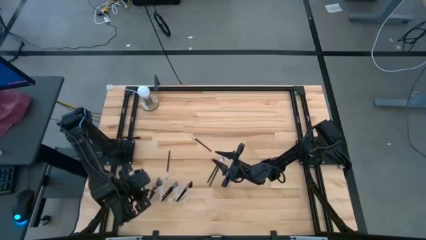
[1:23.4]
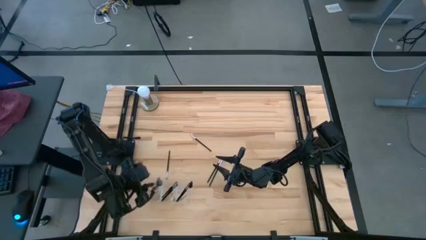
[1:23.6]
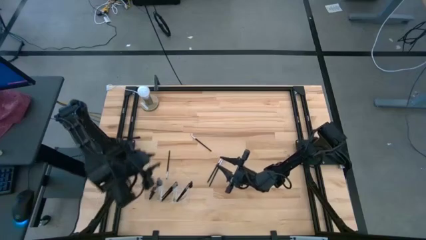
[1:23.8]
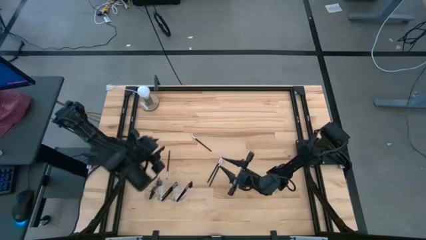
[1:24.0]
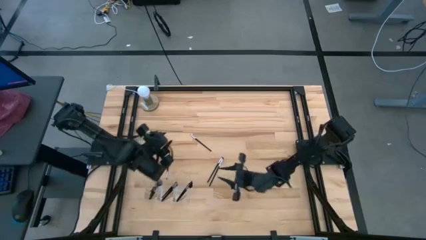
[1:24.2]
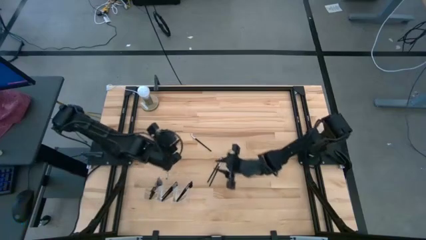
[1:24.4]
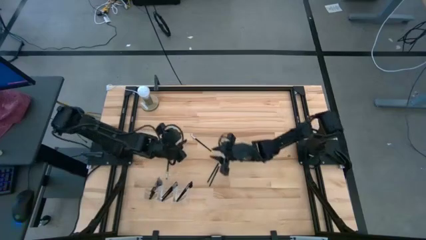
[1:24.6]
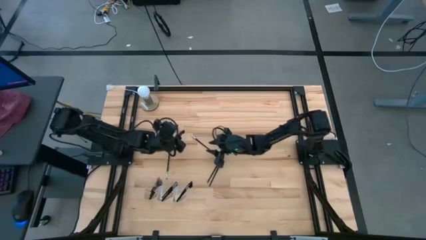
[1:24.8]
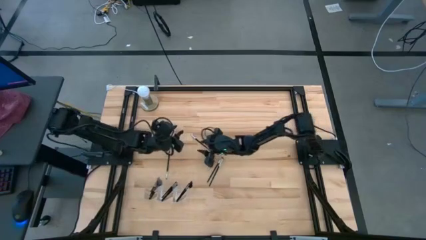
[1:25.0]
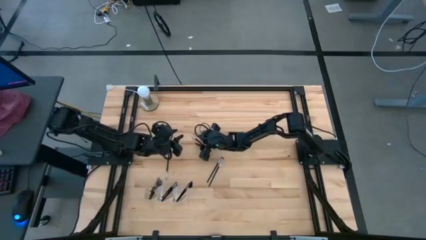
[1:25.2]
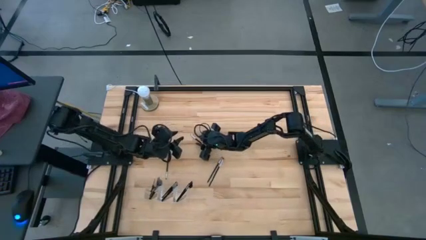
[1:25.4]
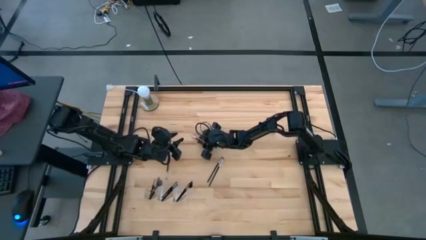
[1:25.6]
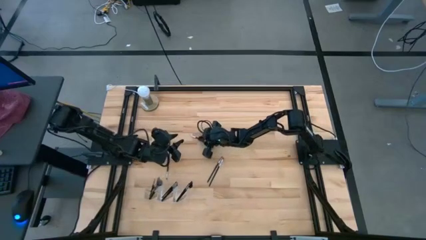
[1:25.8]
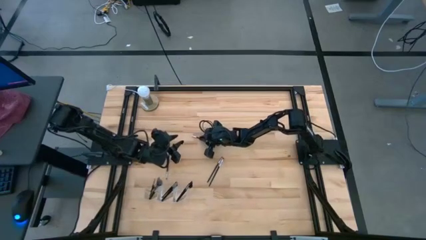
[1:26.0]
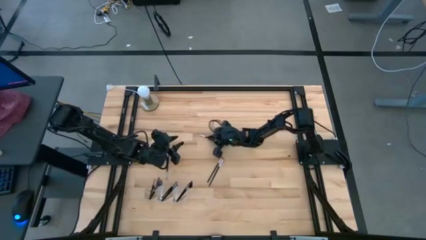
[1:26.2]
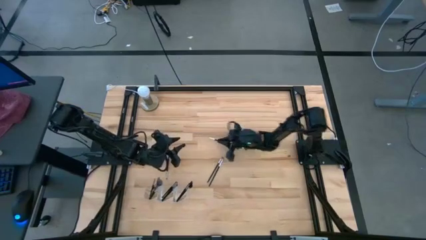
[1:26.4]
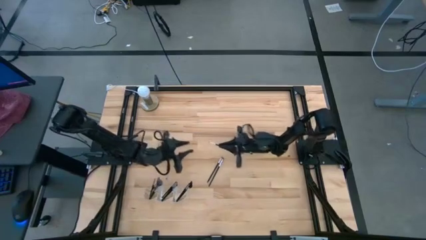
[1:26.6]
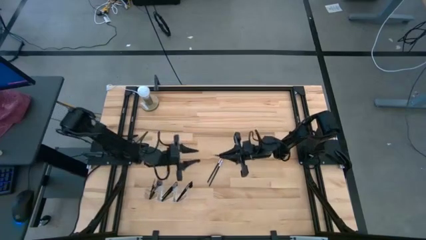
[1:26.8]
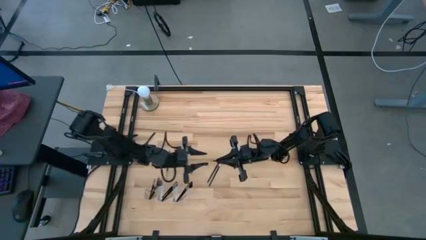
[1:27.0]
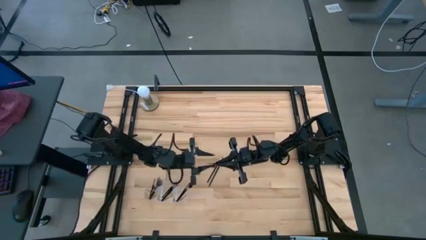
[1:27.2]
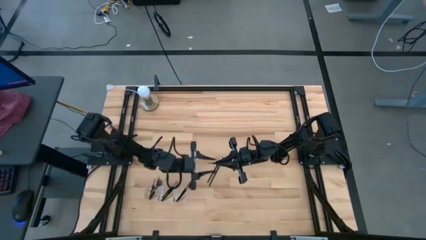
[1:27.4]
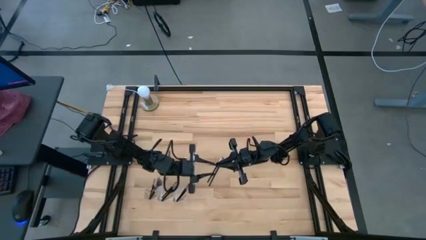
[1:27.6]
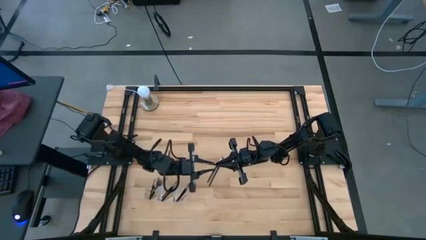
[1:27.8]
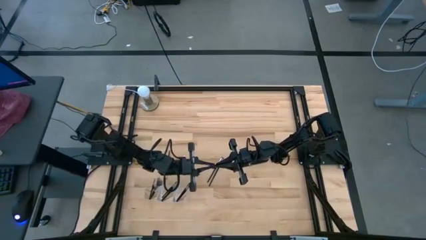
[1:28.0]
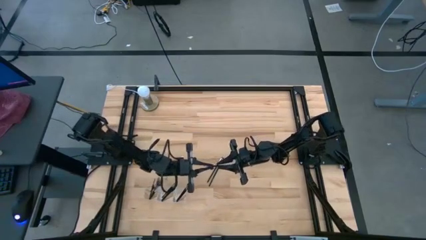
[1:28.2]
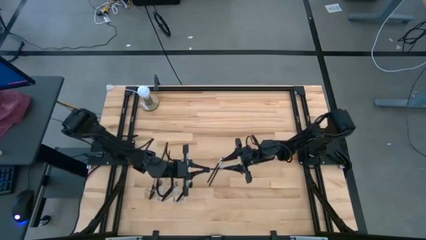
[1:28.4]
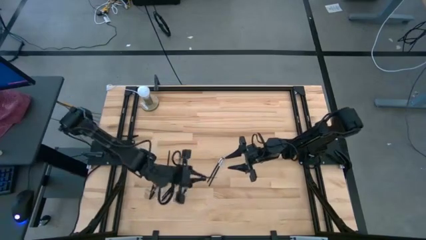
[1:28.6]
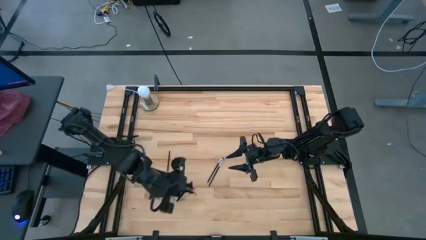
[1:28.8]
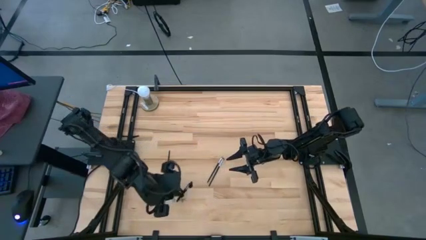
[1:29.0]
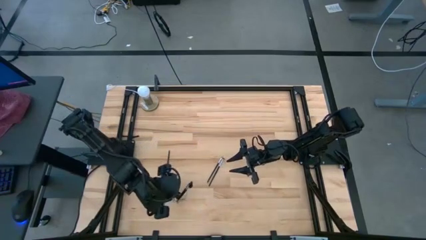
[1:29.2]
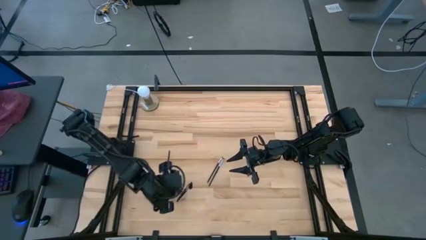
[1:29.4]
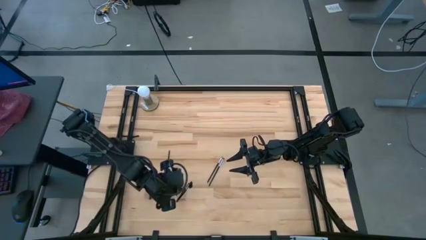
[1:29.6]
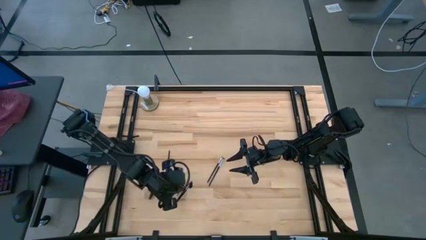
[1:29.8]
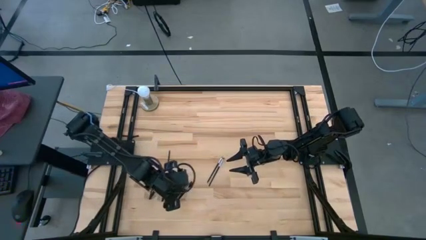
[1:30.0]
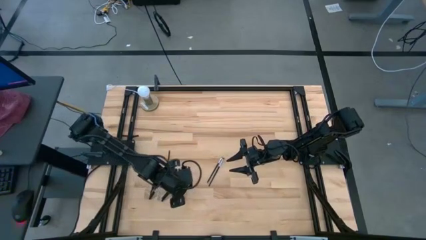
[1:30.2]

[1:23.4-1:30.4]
Task: Put items in baskets/containers
Put the black liner brush into the transparent organizer

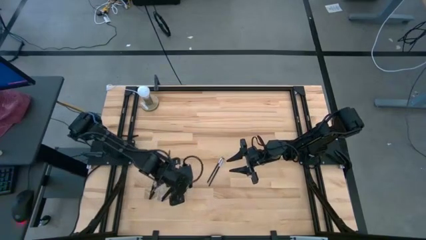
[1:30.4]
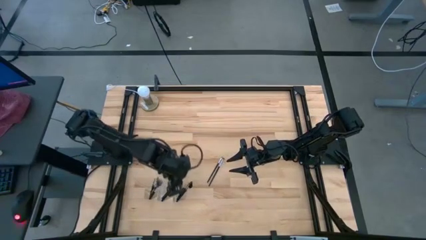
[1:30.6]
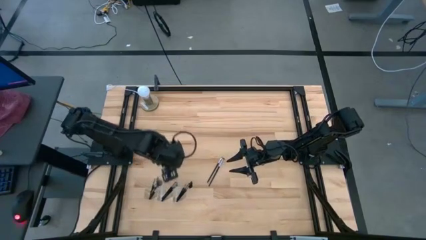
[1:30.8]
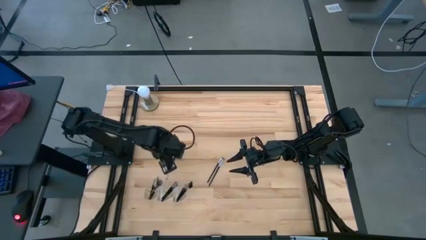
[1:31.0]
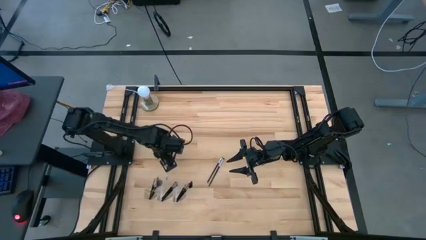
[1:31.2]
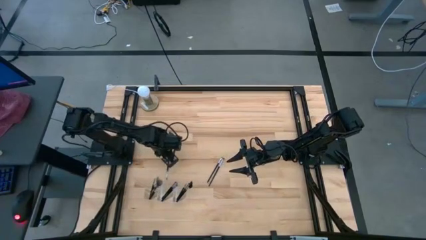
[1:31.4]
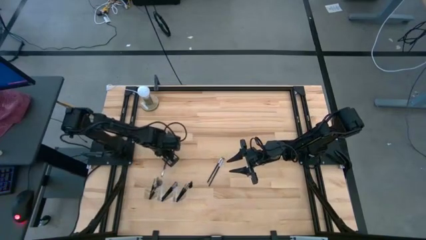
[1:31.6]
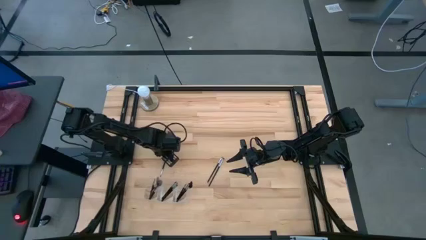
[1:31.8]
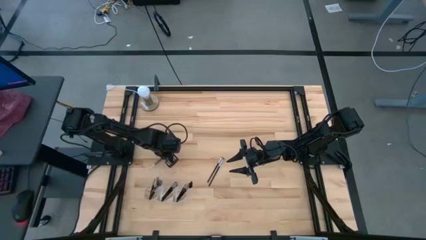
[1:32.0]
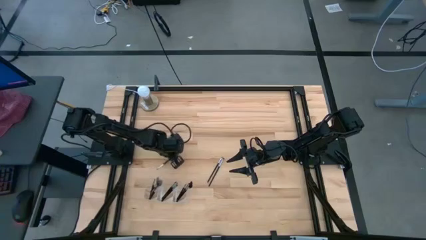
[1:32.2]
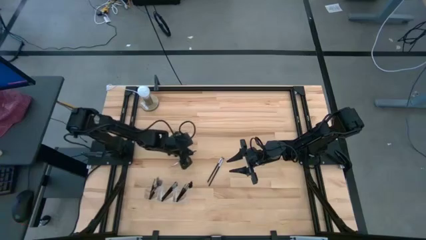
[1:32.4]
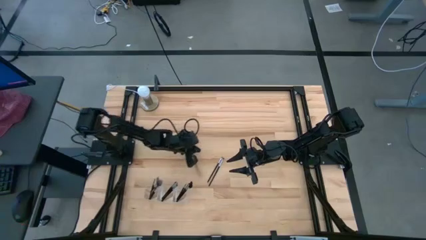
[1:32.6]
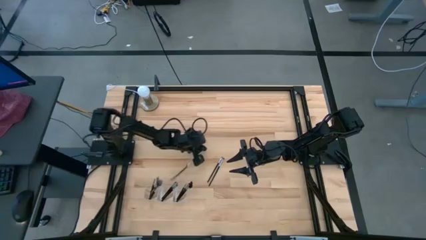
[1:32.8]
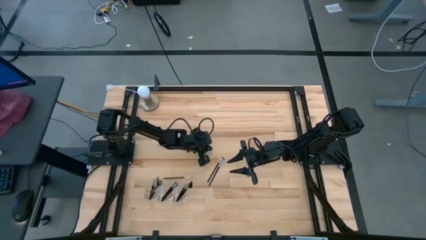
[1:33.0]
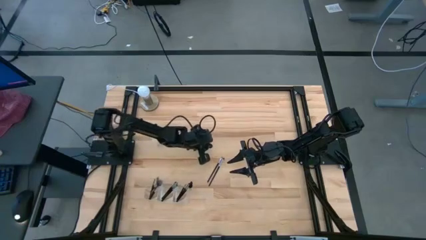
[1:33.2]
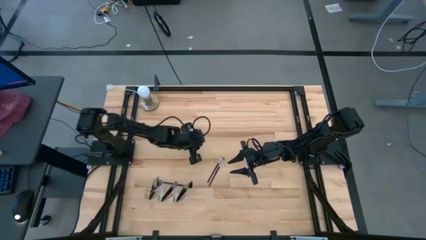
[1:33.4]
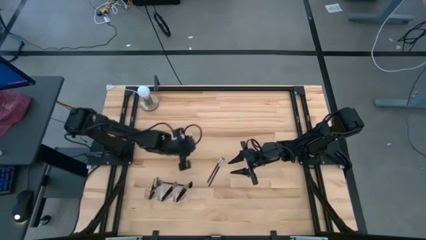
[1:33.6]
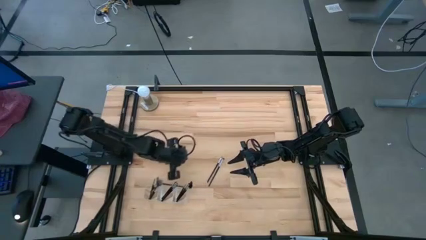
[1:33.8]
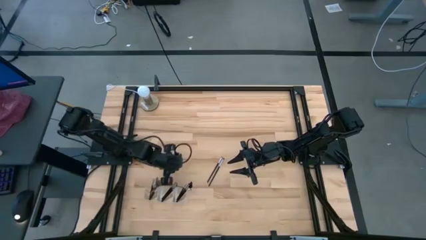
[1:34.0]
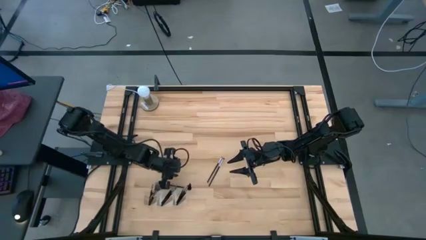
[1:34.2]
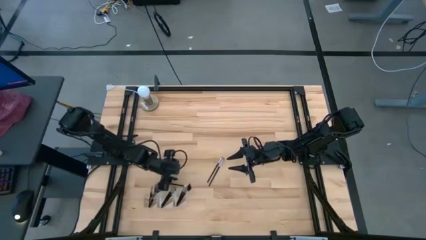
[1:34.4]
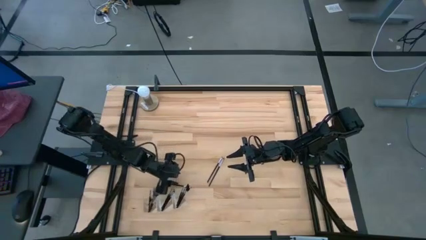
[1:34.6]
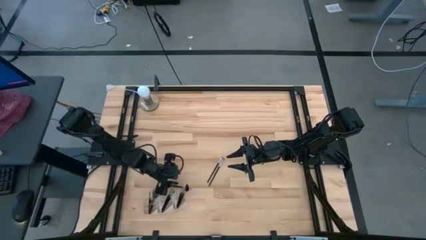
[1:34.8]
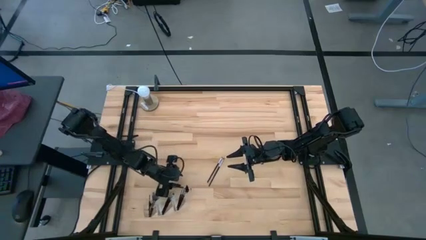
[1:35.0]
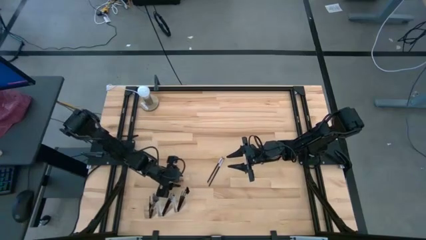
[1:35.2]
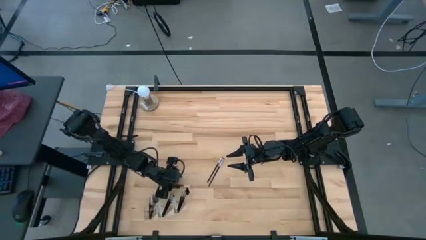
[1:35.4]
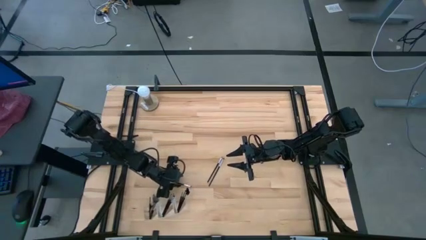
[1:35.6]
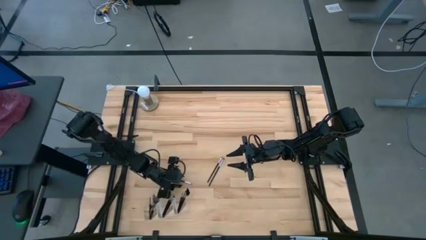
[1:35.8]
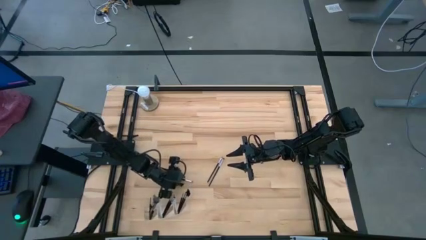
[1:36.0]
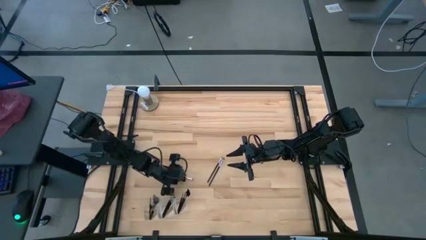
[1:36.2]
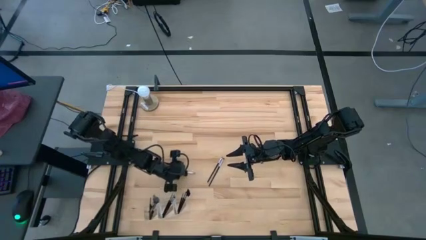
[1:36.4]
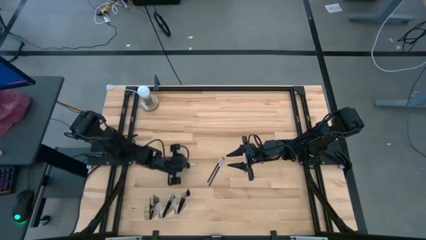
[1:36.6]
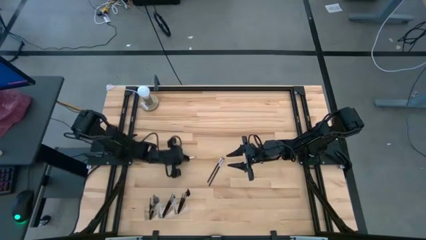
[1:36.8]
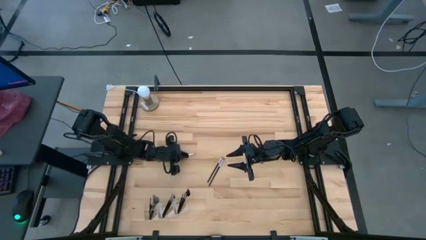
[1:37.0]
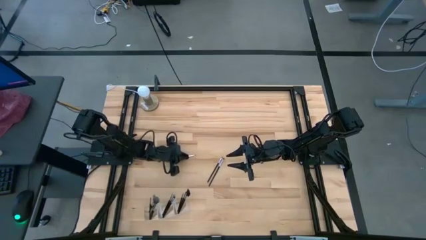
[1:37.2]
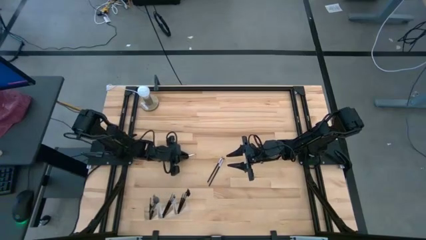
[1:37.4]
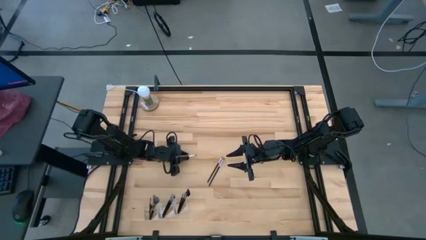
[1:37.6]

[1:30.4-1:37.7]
Put the black eyeshadow brush into the transparent organizer

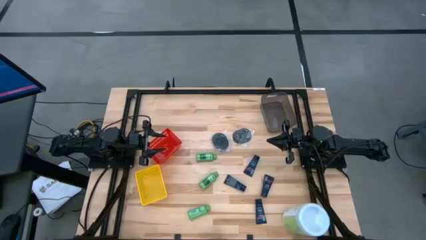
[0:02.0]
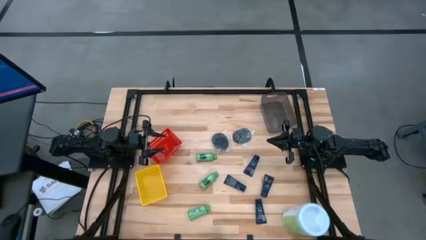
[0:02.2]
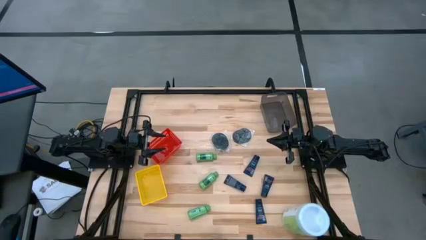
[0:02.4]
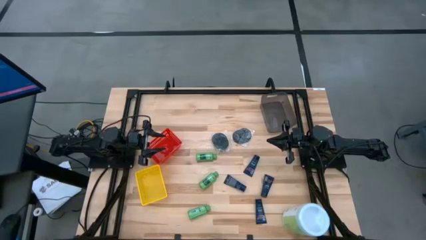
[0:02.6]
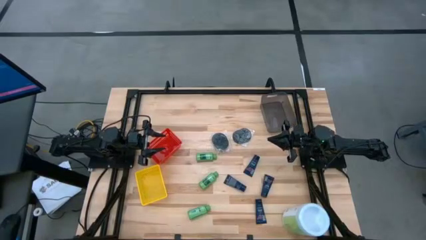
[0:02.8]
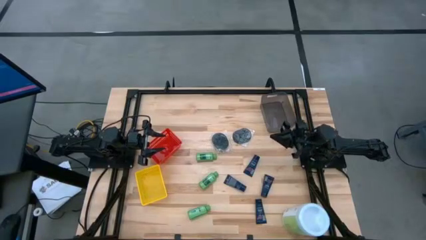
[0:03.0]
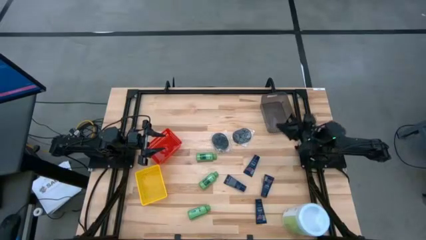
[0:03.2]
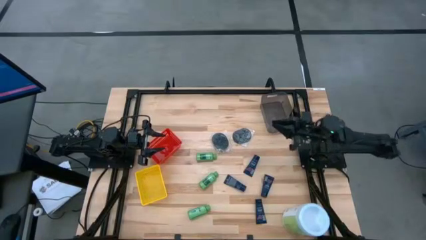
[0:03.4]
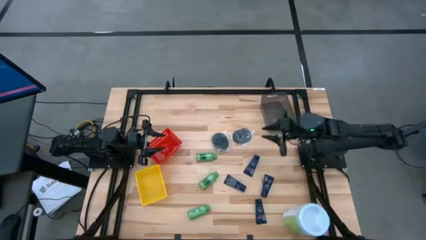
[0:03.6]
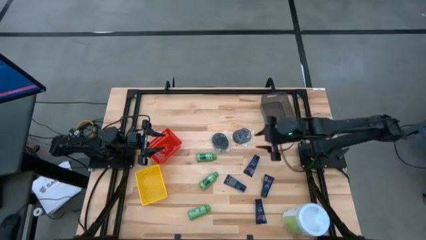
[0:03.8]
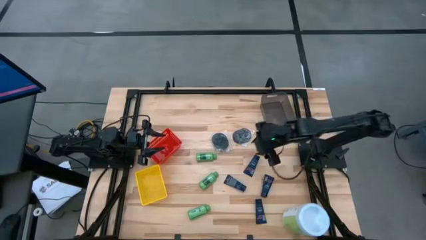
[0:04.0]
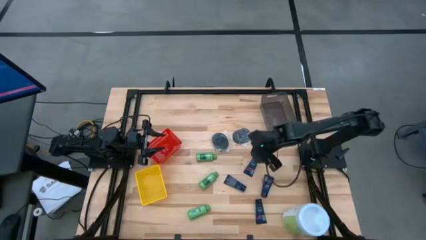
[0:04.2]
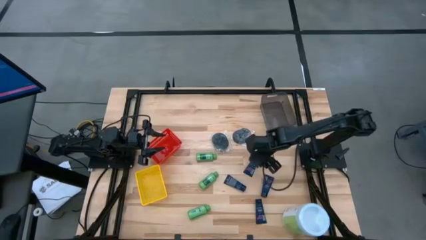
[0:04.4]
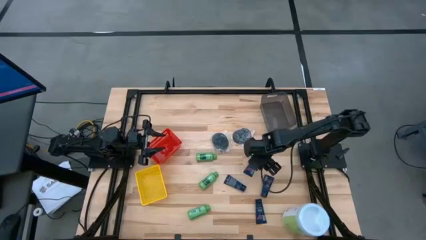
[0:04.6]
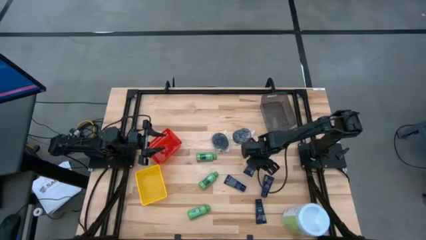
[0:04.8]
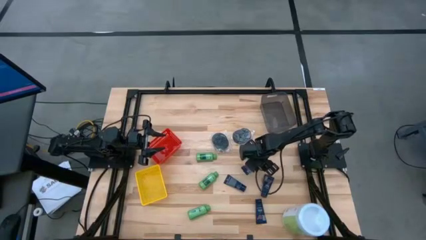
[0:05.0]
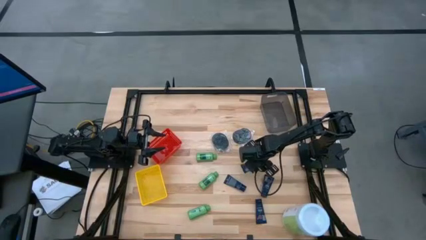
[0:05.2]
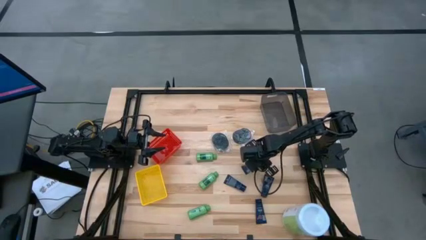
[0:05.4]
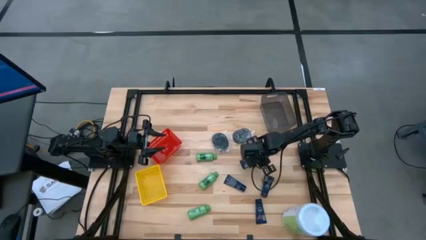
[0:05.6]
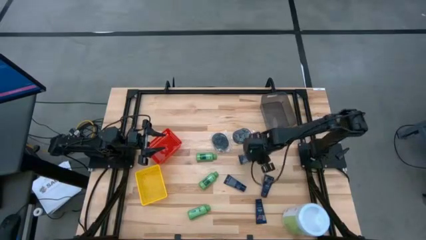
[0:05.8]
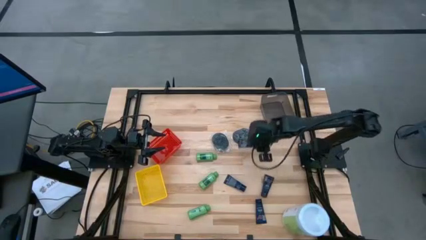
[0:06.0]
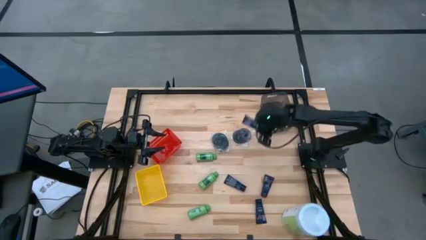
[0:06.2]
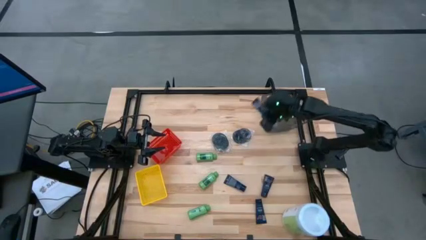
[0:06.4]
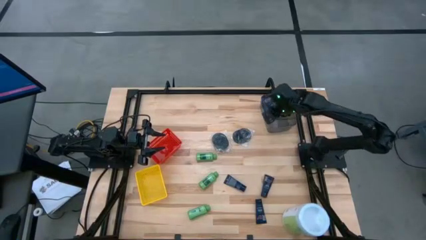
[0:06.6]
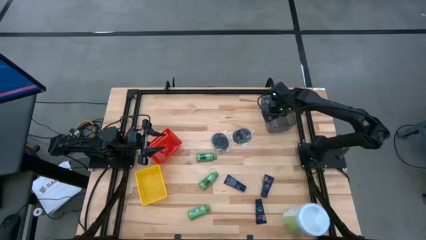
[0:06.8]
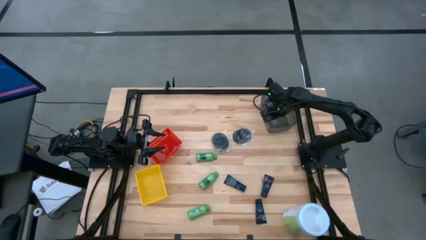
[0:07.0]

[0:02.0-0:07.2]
Task: Pick & Place Travel size toiletries
Put the shaving cream into the black bin
